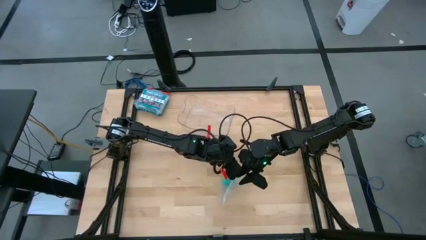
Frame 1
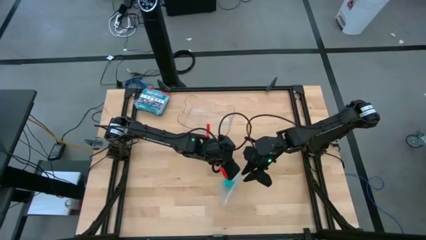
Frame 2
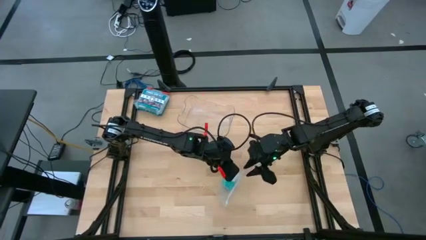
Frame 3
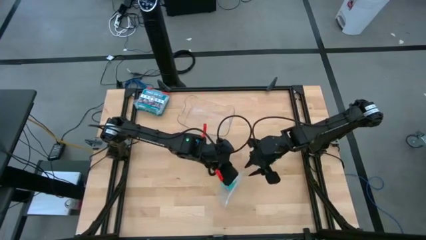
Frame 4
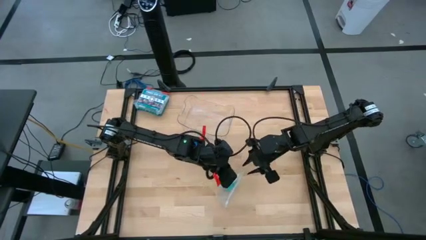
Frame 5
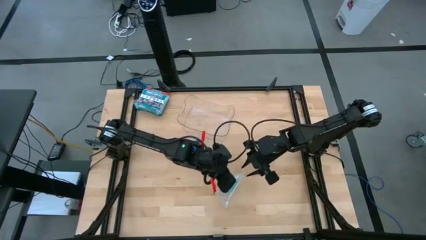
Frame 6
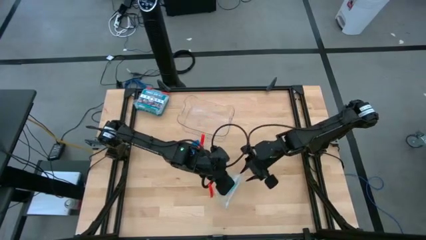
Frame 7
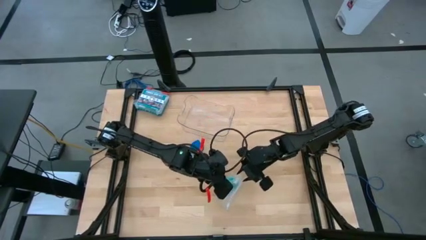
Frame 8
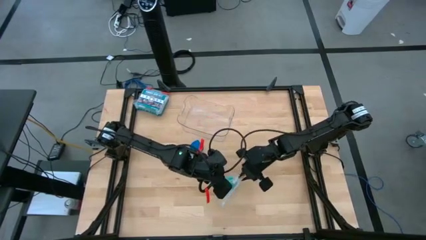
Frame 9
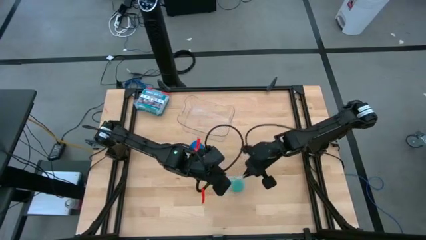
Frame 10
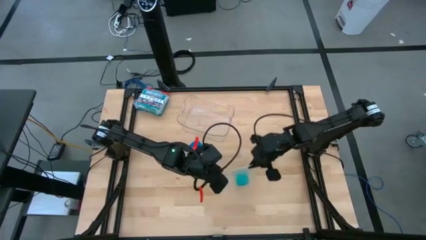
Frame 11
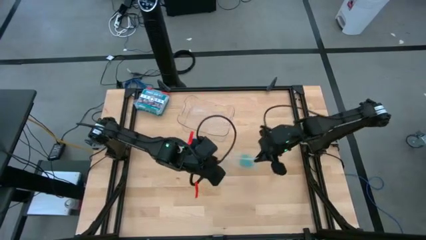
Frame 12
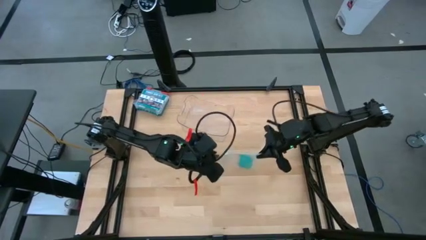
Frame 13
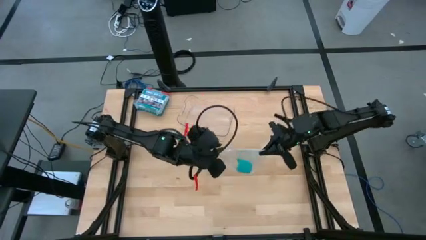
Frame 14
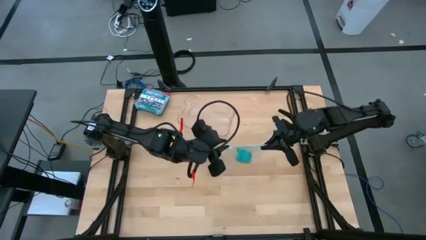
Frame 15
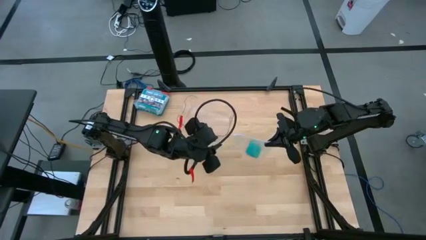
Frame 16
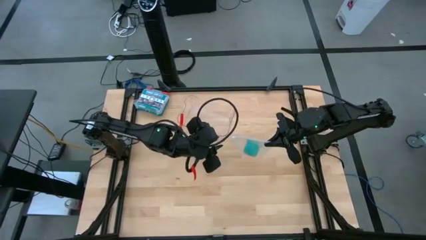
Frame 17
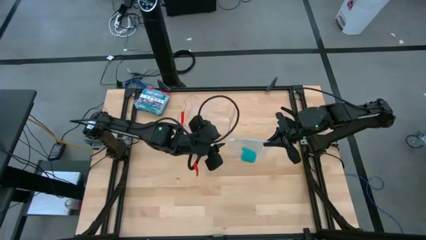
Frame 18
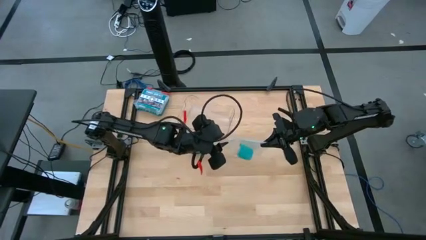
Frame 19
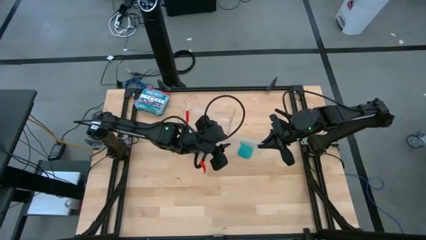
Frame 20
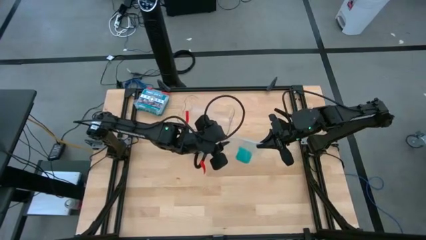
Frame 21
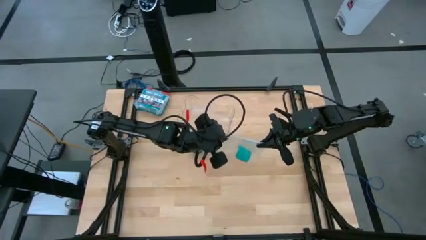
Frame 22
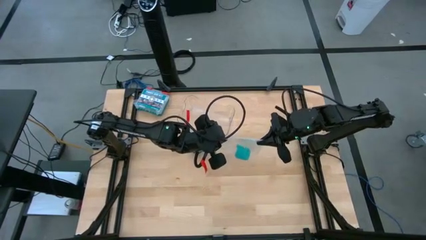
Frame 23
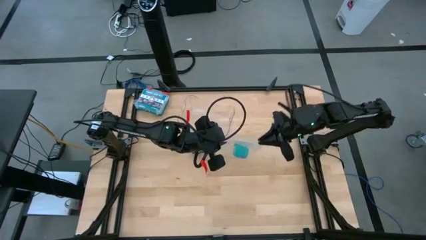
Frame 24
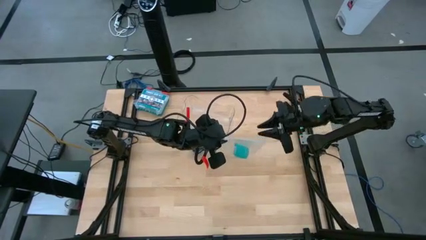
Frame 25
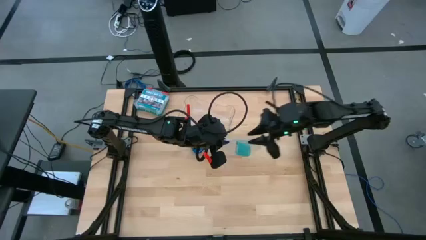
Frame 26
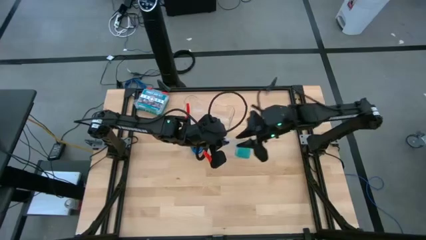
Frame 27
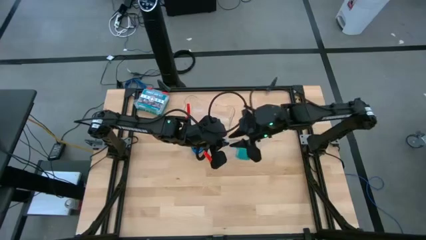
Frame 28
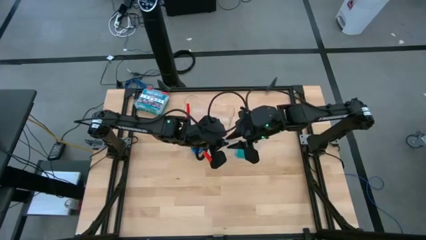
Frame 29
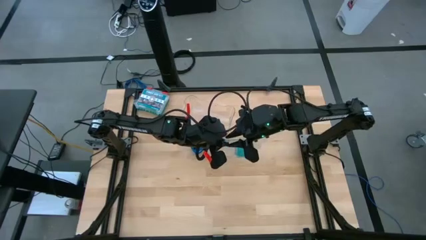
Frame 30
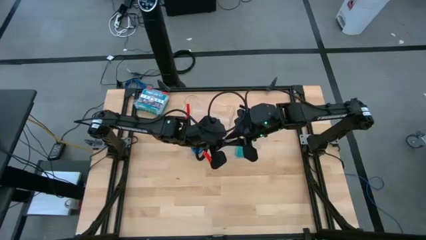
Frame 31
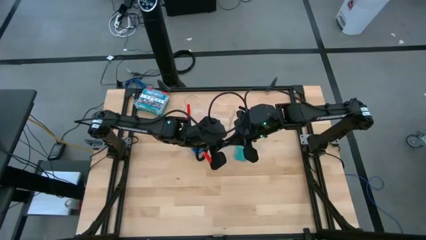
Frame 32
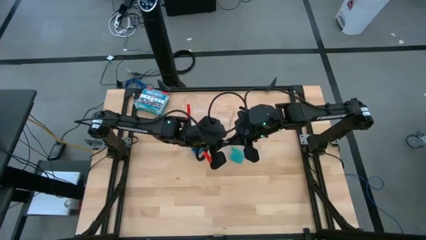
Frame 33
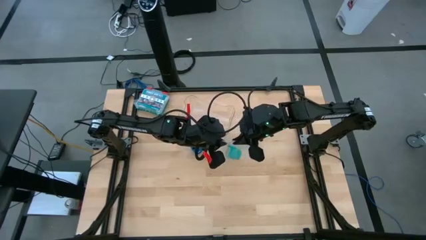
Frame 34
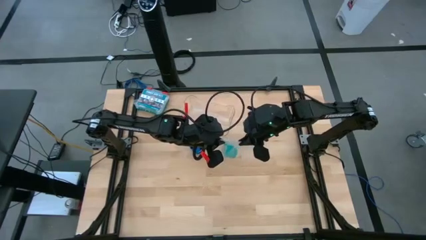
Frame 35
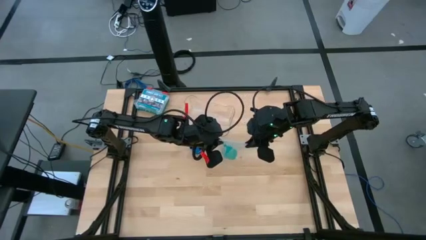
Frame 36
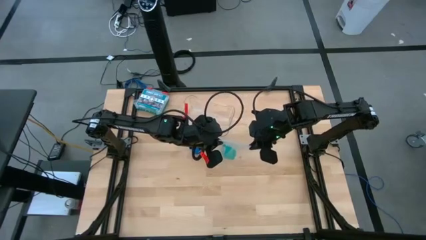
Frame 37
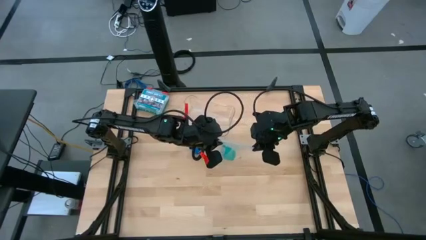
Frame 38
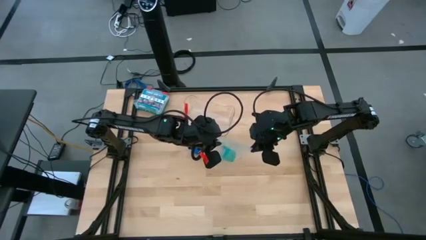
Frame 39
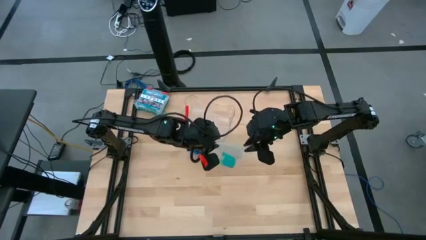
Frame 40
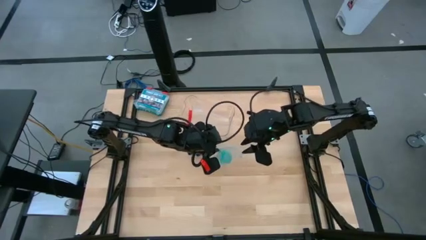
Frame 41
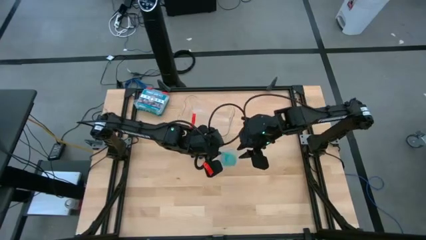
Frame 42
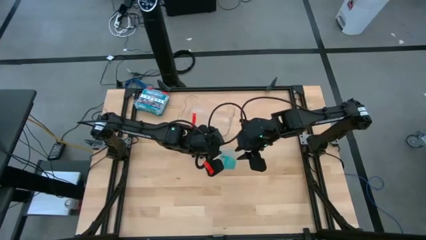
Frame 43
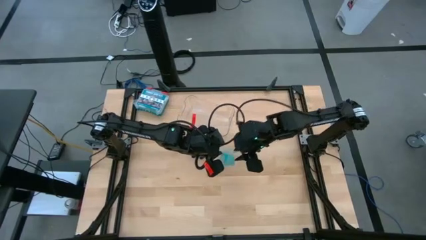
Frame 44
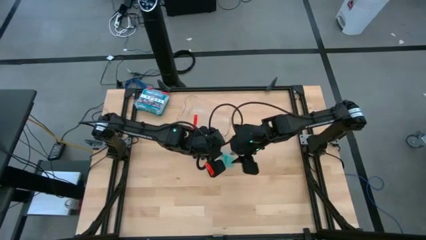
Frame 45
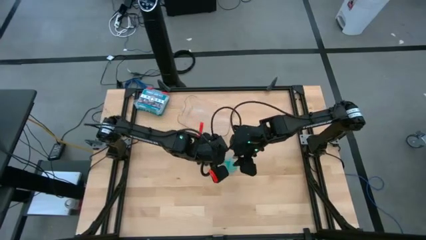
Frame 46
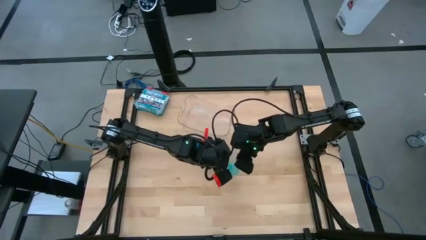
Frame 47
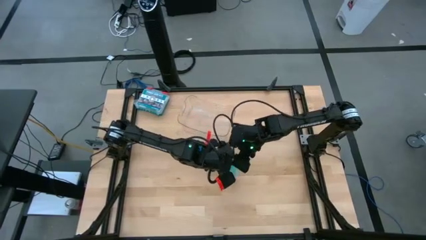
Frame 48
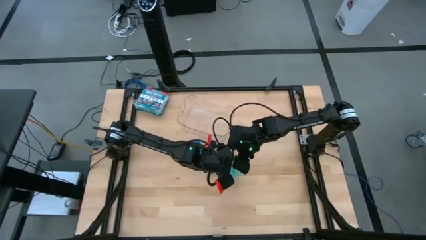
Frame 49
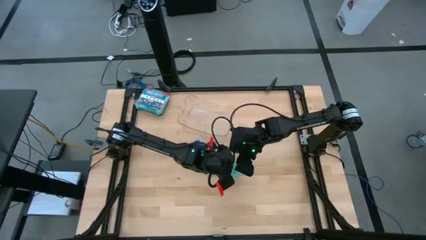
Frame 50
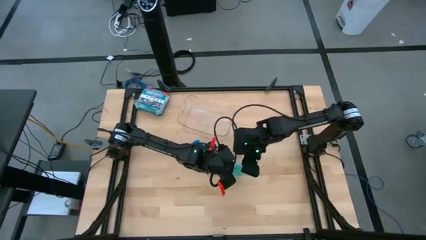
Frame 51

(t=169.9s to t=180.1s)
Task: Roll bandage
Open the transparent zip bag

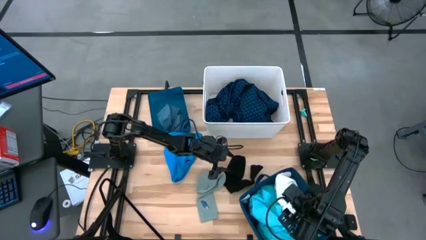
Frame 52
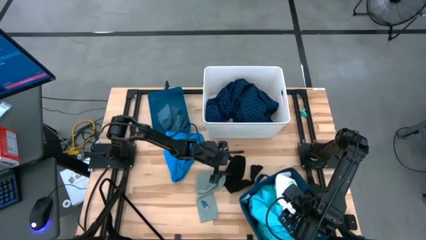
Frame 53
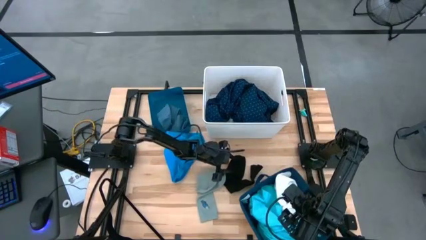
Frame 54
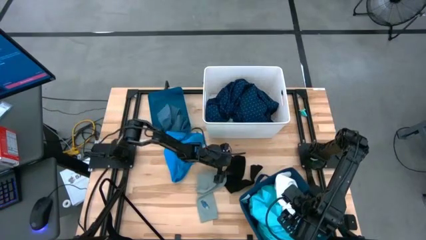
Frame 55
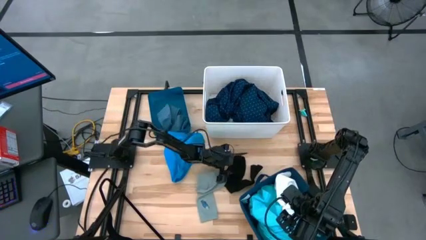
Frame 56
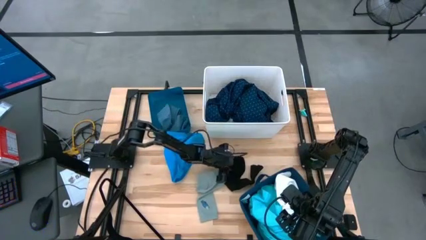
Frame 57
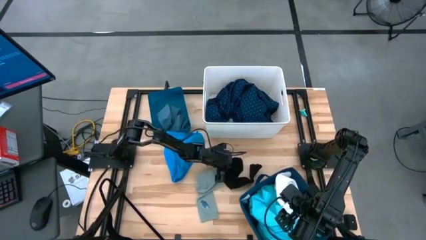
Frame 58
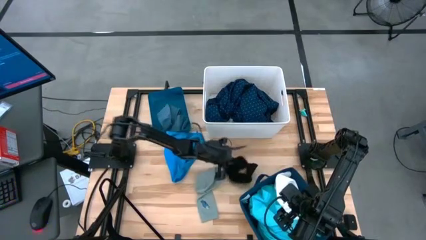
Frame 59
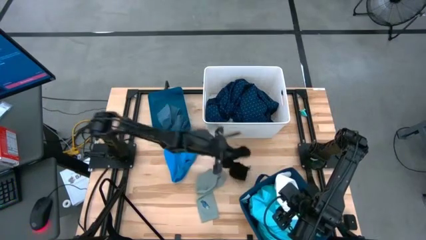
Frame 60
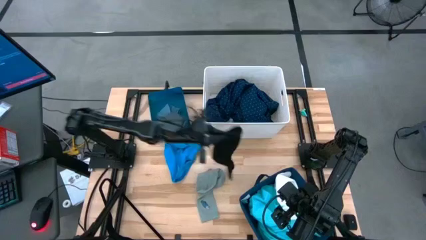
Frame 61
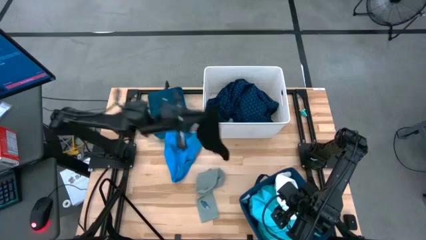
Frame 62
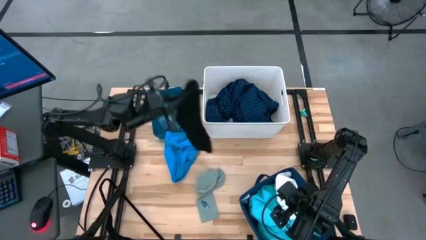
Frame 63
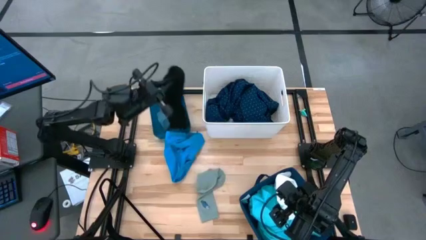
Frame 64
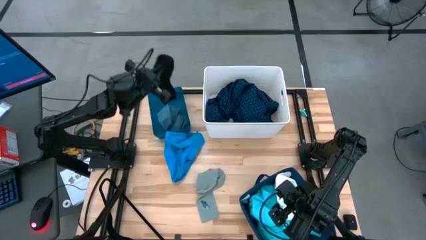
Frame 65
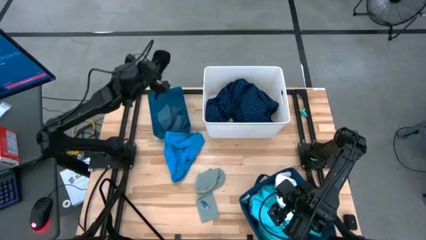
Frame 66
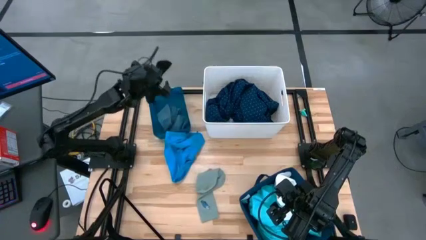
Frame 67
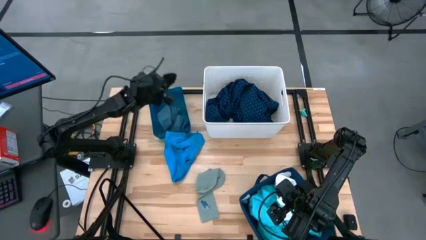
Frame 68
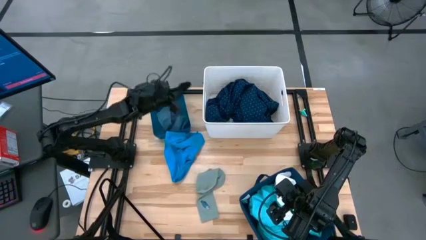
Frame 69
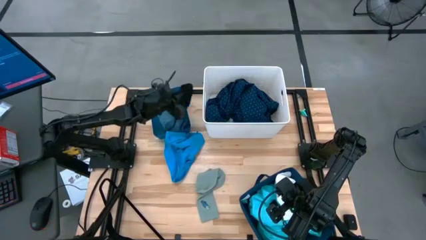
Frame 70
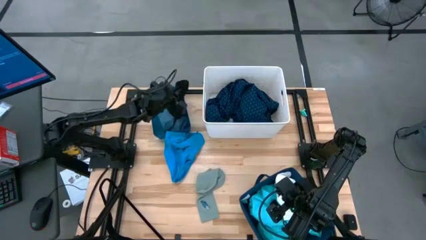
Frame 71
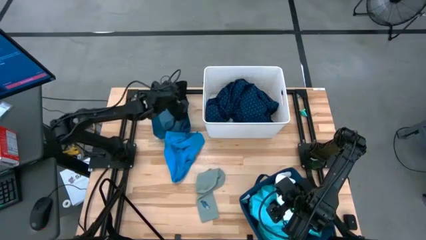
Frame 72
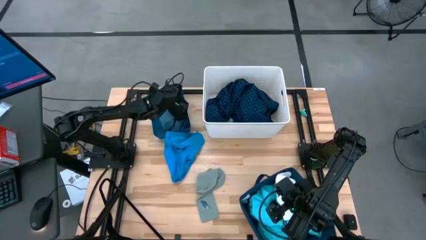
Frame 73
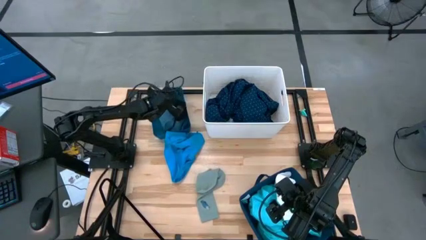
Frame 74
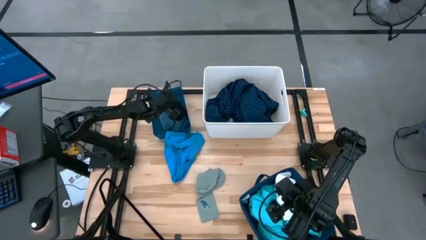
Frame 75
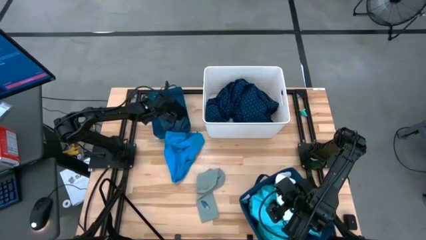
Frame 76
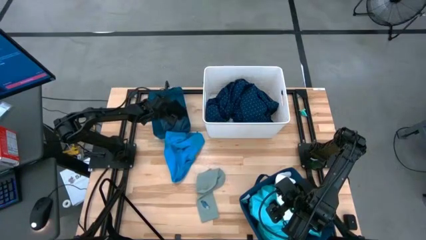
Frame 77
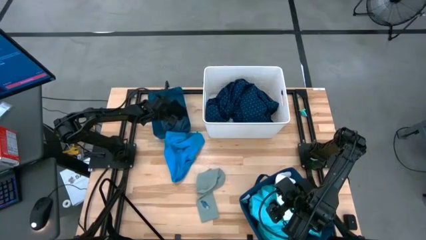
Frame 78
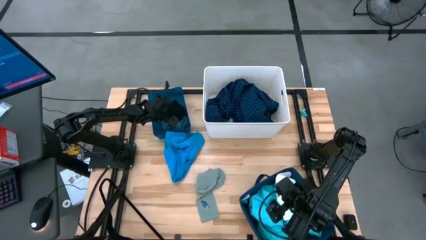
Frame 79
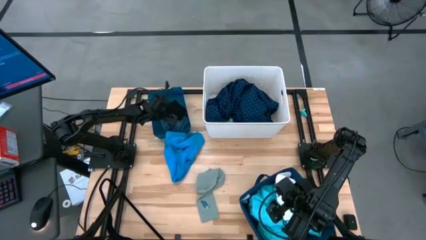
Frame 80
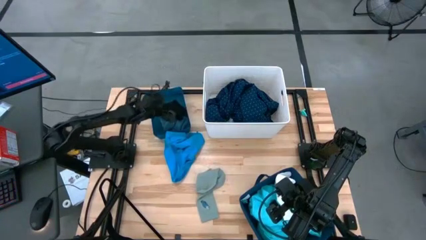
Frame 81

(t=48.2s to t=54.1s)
Task: Pick & Place Cloths
Put the black sock into the blue bin
